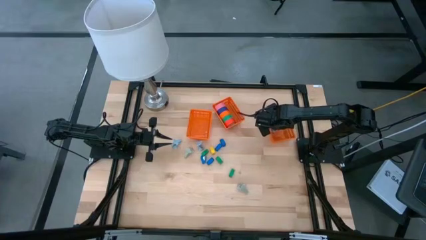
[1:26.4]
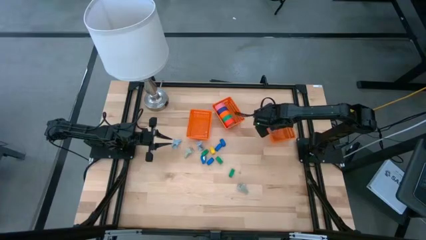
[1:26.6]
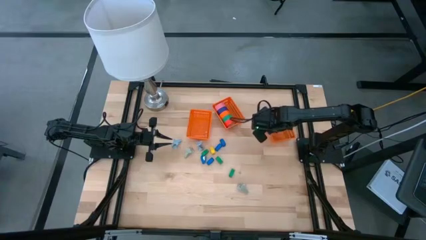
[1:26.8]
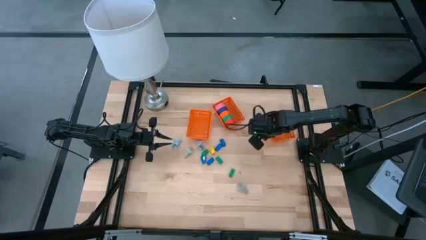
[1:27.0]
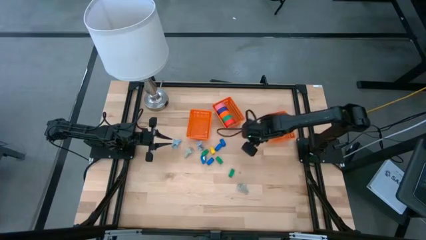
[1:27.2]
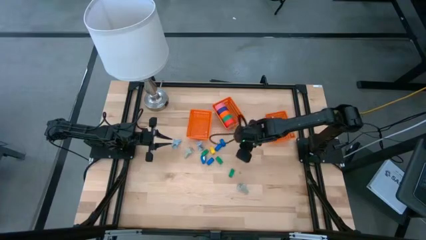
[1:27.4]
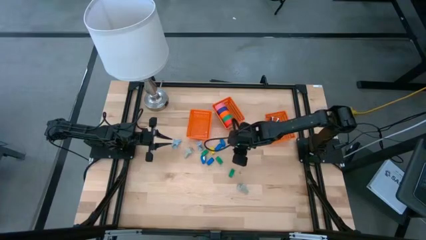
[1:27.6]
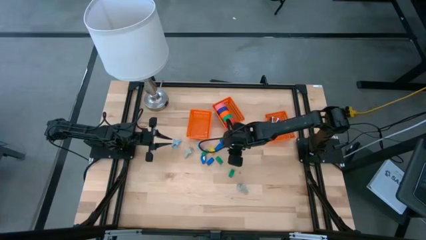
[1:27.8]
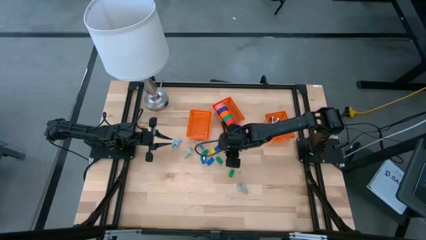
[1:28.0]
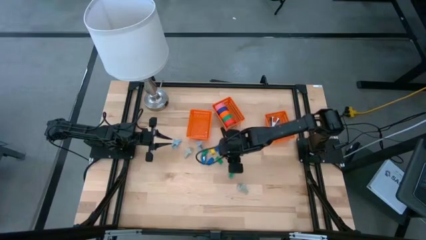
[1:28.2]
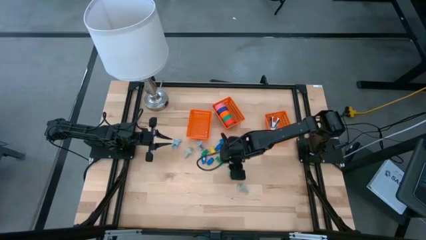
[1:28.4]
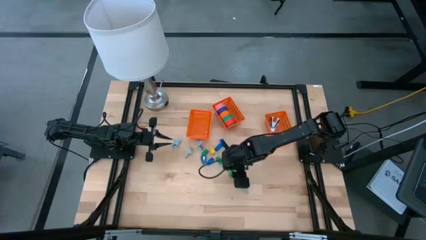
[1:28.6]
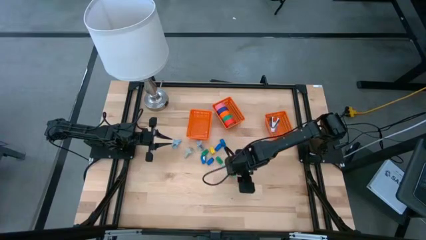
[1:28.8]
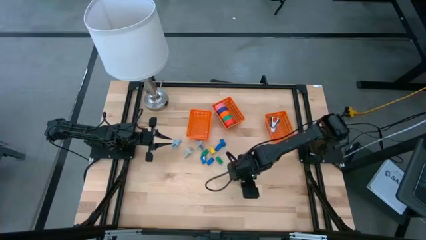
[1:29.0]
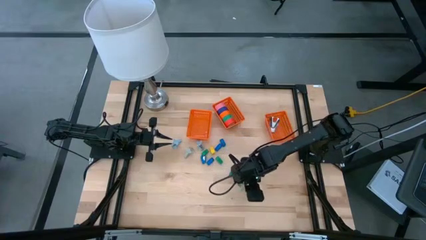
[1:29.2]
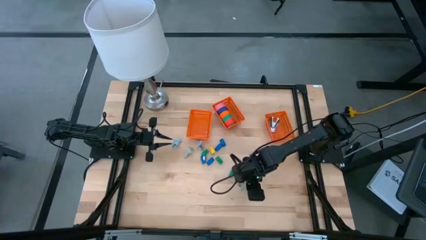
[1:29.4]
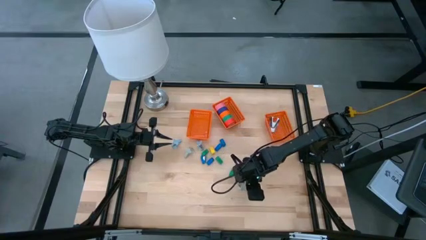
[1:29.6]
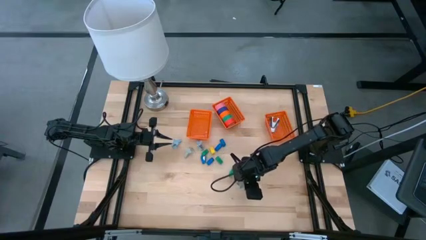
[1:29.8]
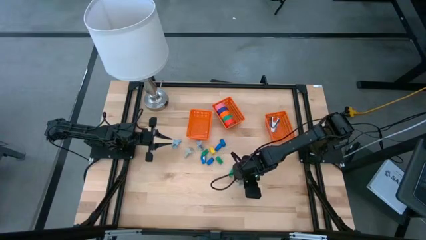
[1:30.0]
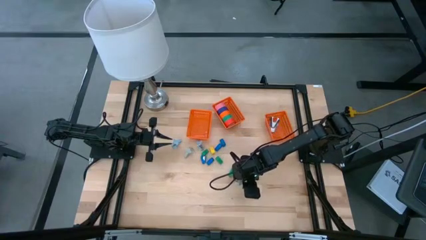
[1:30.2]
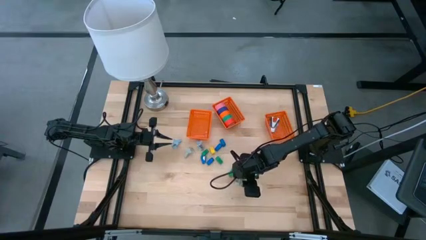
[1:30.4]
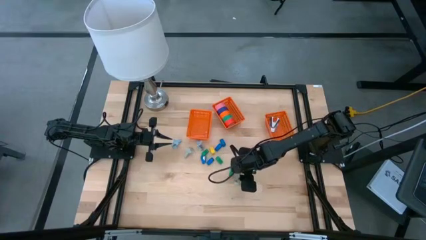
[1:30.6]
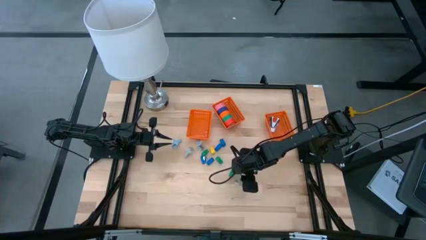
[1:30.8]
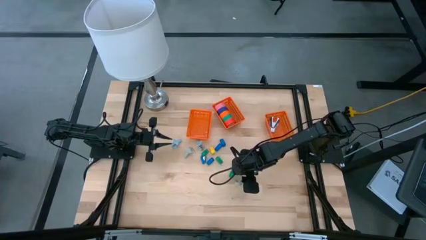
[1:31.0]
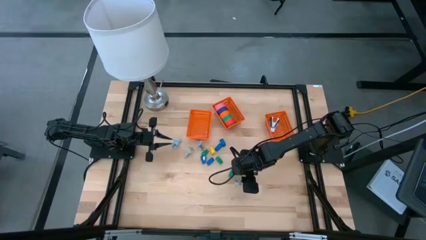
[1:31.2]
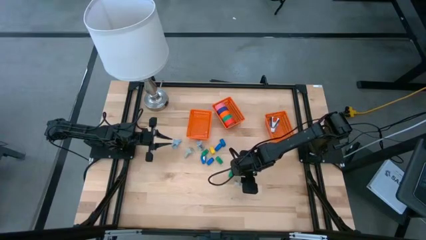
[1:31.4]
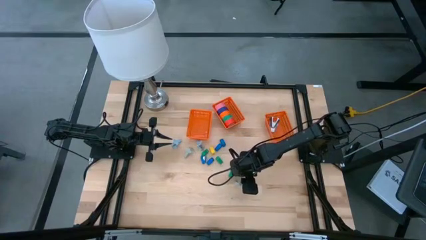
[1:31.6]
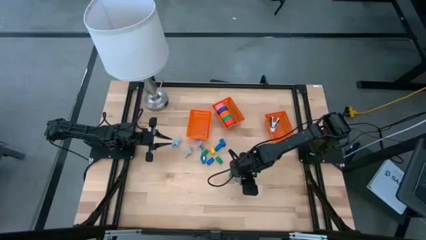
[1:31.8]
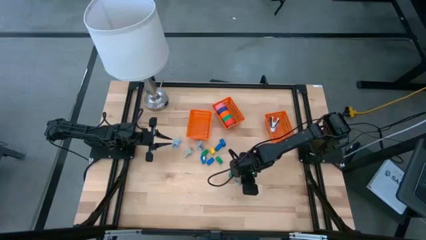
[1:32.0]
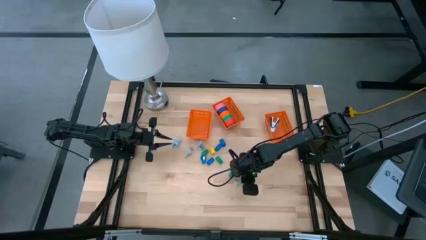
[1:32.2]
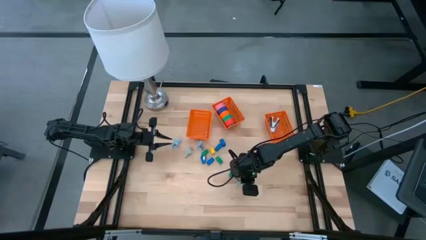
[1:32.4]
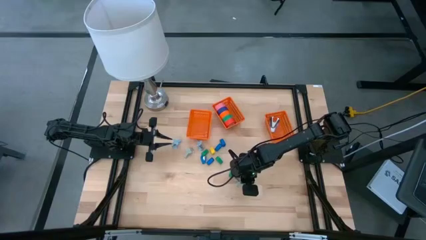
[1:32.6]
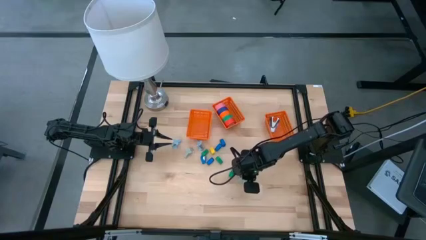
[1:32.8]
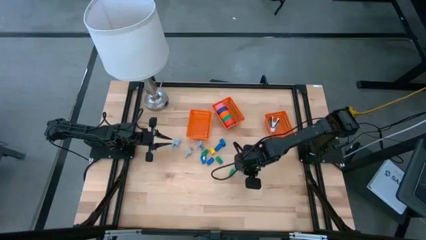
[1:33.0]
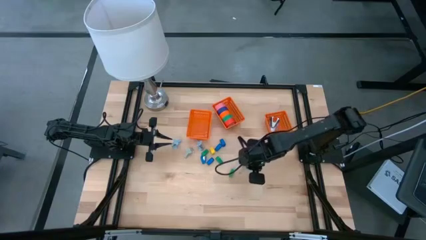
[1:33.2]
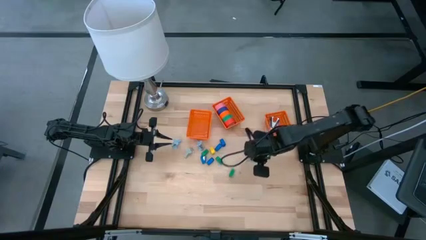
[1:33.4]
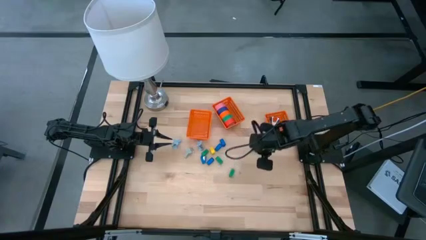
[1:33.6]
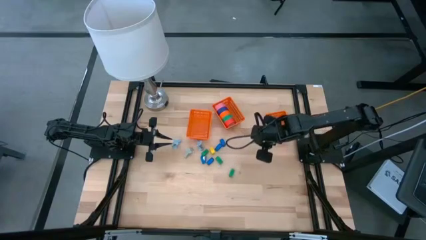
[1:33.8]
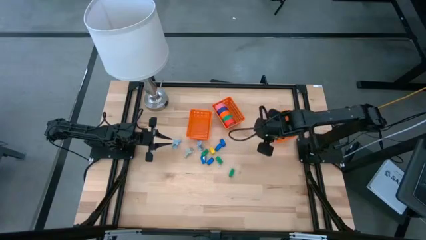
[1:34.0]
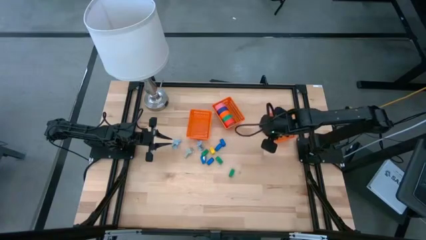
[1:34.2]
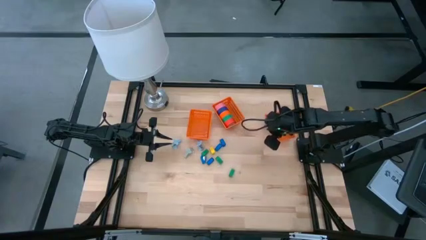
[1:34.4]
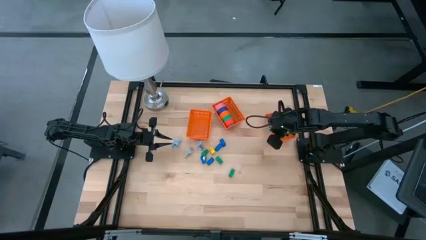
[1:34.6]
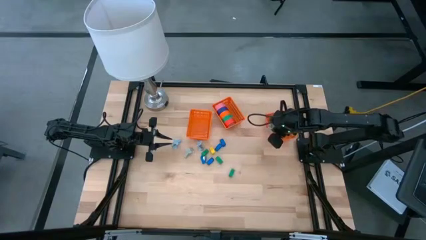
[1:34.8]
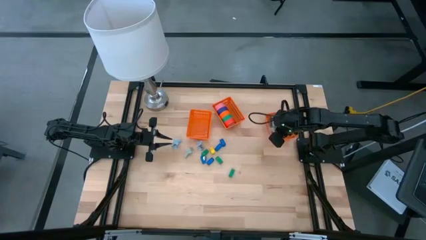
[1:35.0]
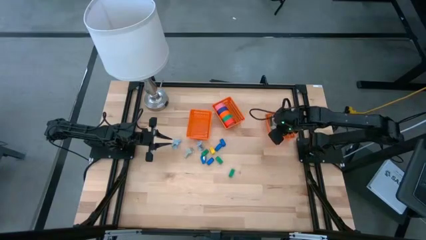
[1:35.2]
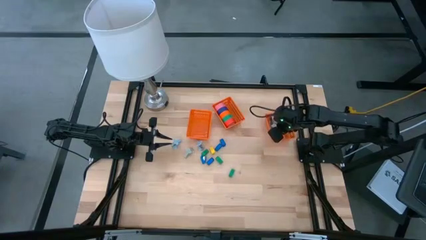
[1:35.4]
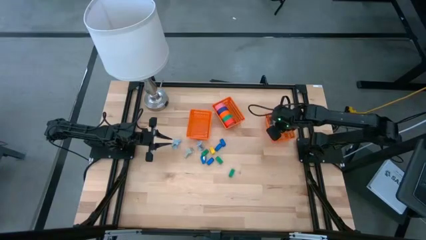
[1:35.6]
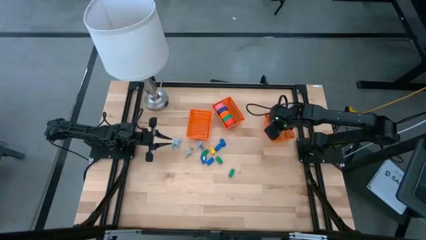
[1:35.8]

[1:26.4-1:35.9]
Task: Pick and place Stapler, Stapler remover, tape
Put the gray staple remover into the right orange bin

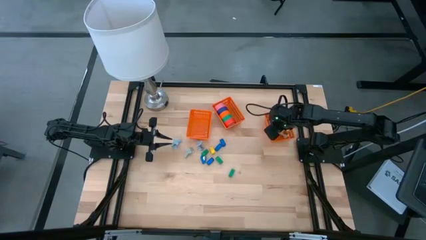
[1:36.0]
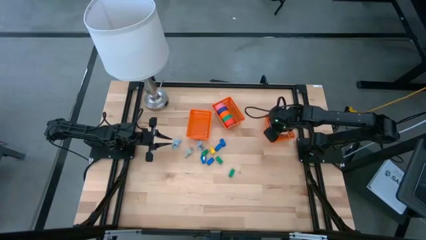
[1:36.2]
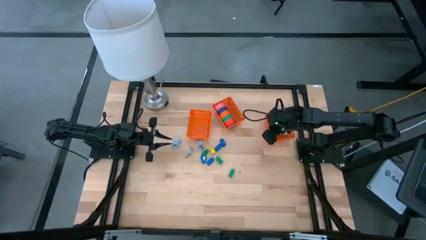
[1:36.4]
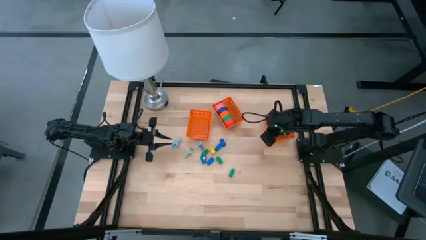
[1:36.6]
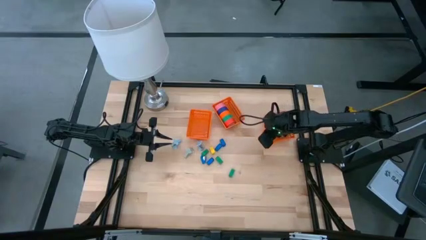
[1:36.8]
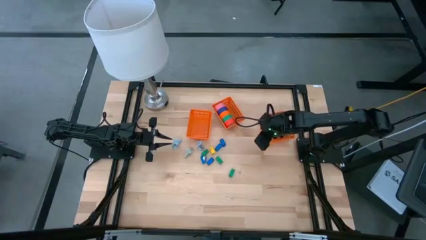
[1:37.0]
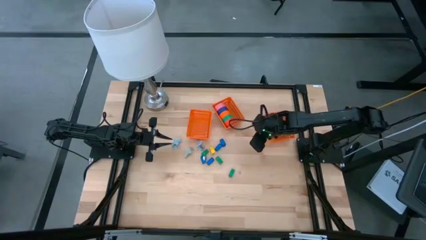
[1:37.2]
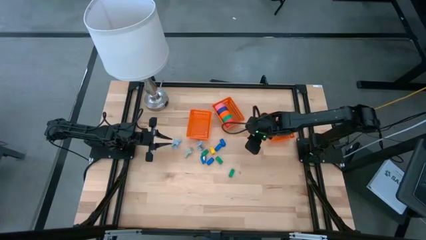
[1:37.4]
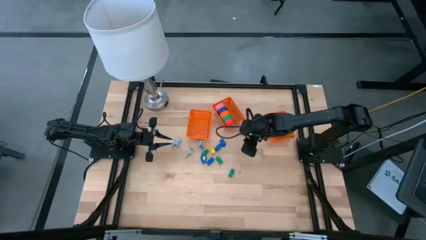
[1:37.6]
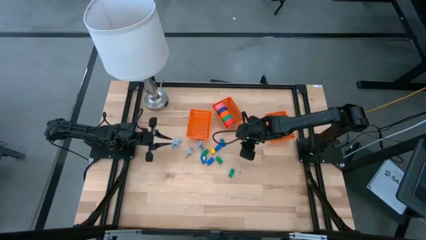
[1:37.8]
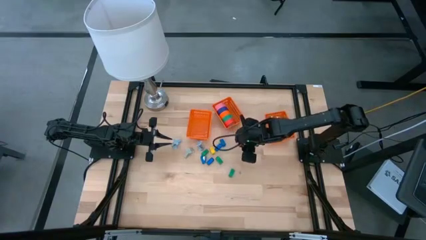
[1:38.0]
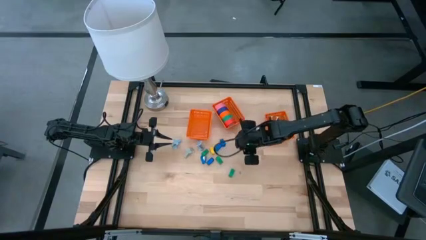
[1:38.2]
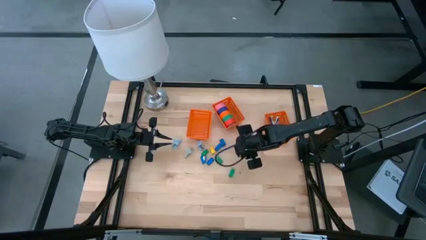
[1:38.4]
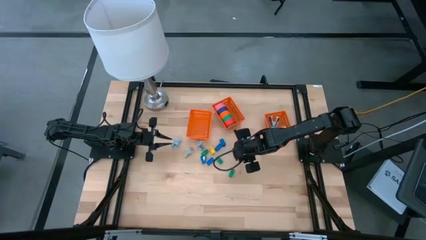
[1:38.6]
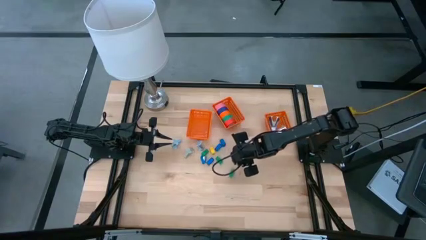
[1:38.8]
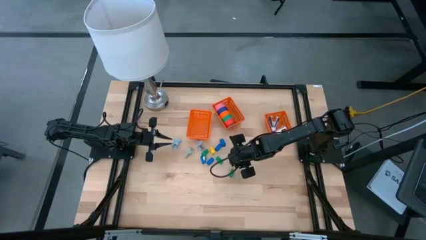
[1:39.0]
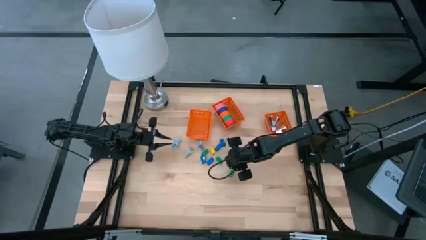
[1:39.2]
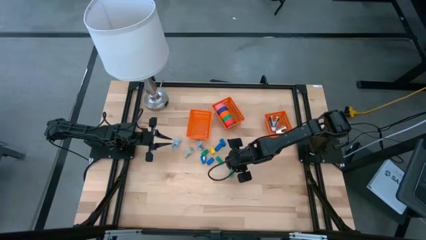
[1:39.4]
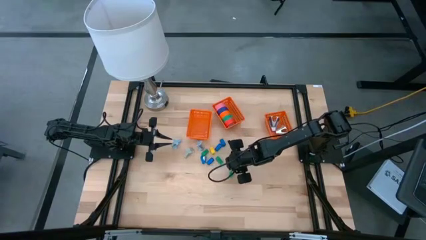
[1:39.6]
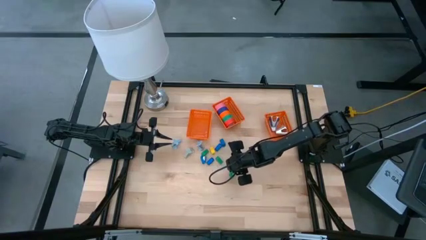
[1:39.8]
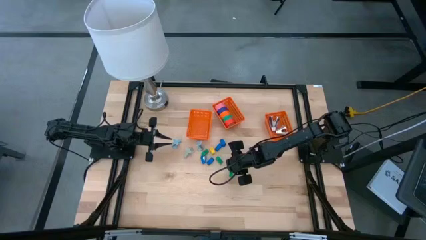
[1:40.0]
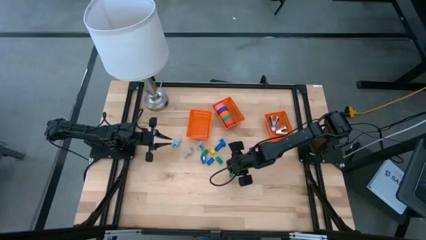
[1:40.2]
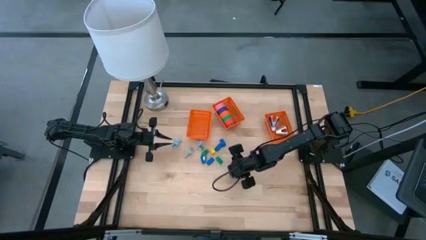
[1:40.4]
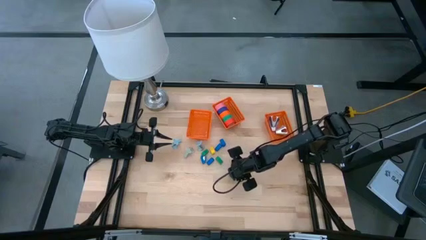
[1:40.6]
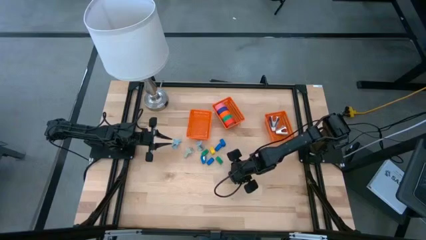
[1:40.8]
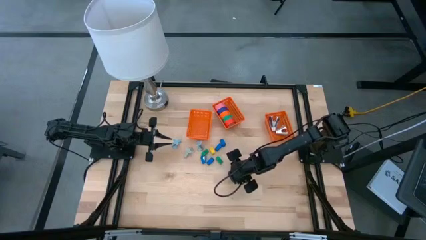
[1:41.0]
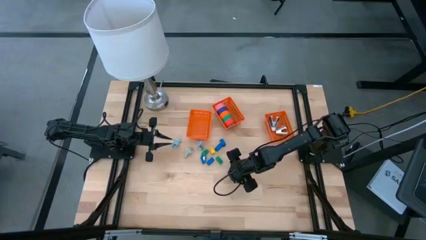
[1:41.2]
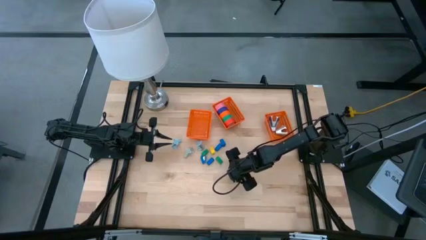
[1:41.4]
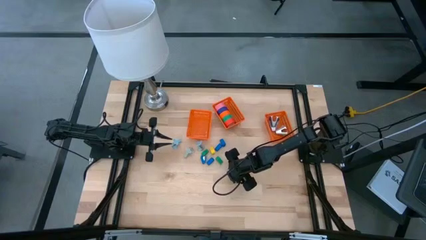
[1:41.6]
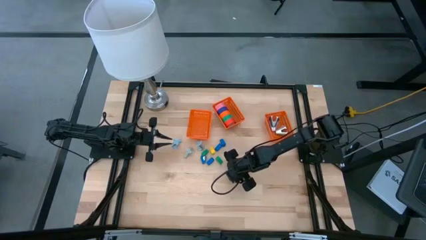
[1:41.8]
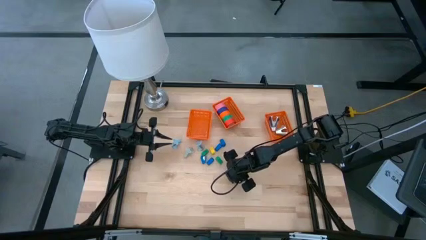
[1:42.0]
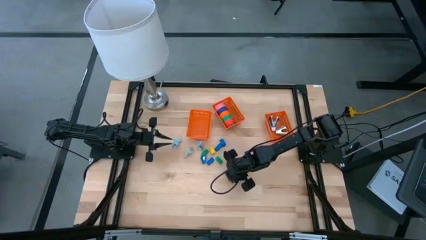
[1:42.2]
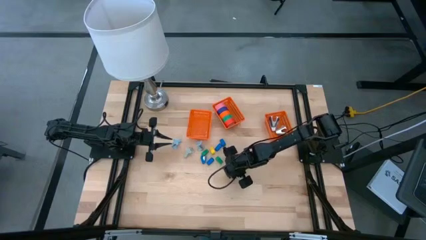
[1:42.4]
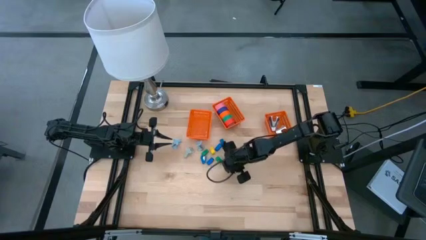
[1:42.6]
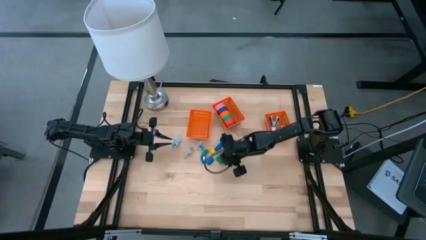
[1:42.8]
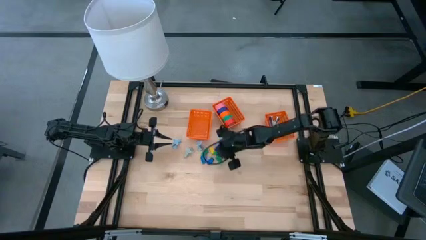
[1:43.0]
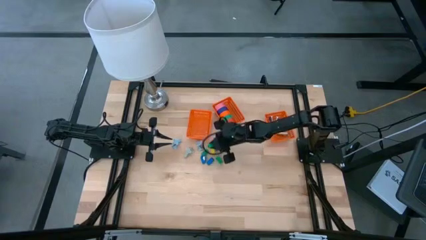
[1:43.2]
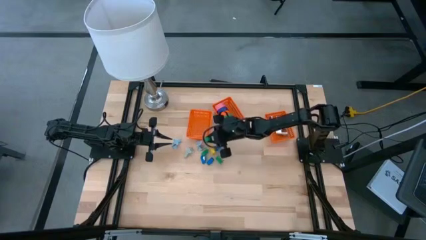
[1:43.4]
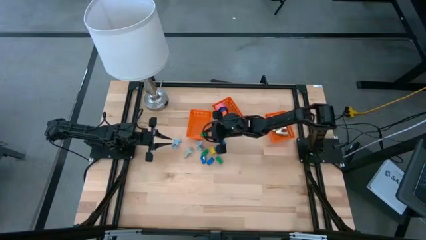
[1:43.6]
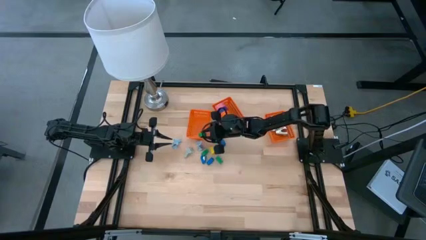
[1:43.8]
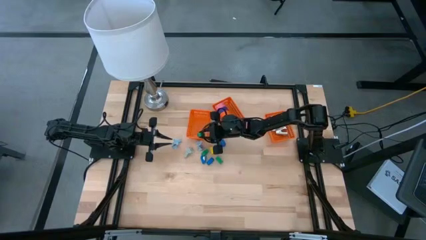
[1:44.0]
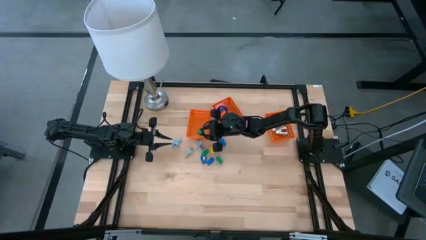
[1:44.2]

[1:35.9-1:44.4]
Put the green stapler into the left orange bin
